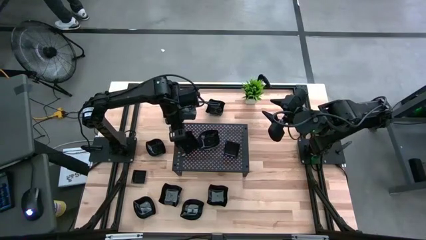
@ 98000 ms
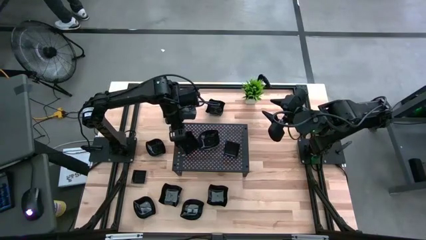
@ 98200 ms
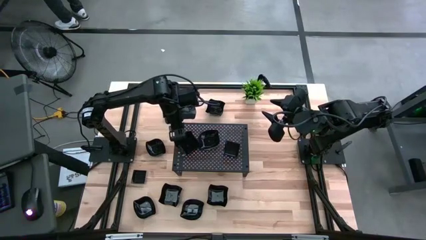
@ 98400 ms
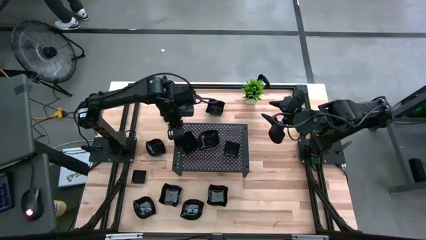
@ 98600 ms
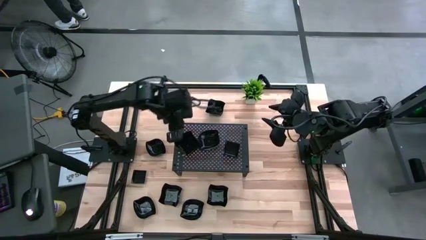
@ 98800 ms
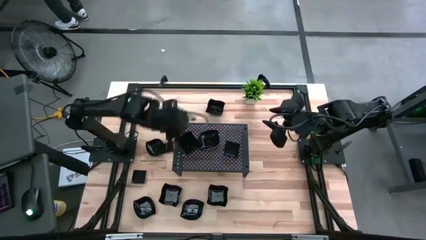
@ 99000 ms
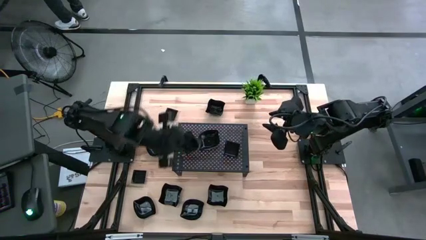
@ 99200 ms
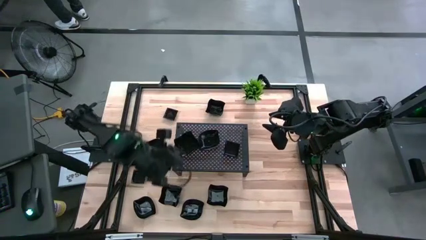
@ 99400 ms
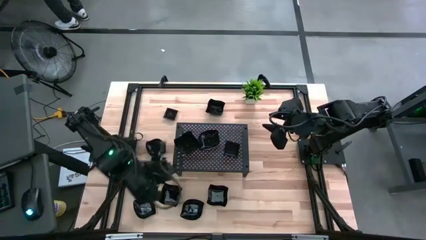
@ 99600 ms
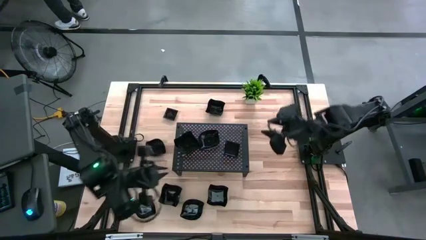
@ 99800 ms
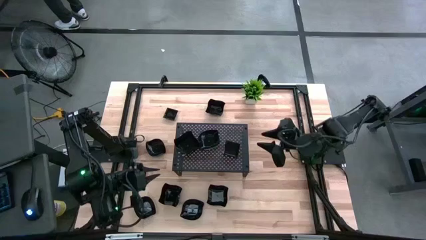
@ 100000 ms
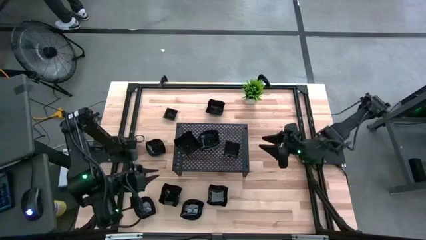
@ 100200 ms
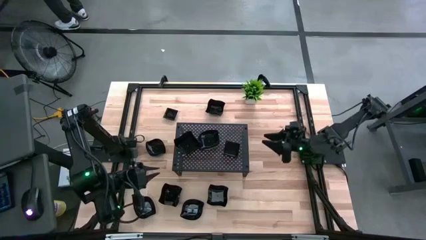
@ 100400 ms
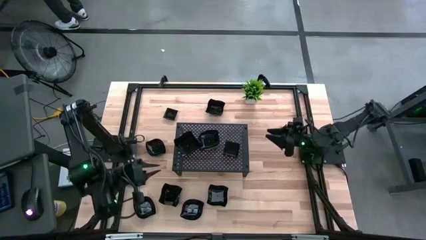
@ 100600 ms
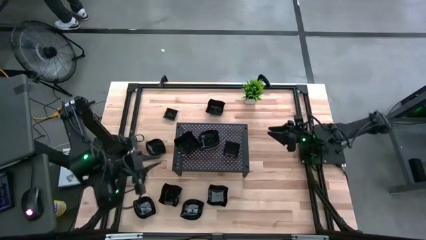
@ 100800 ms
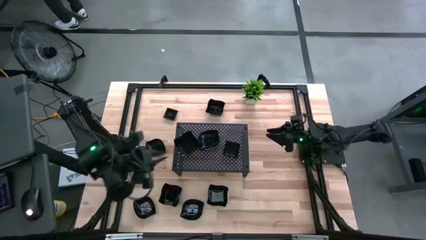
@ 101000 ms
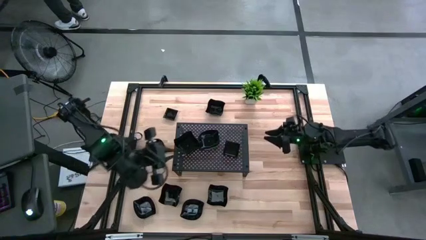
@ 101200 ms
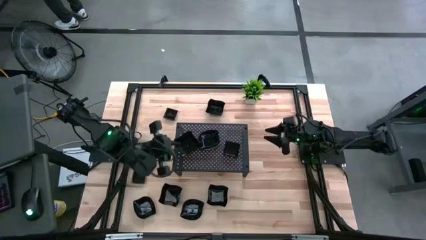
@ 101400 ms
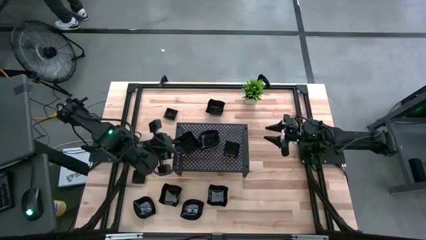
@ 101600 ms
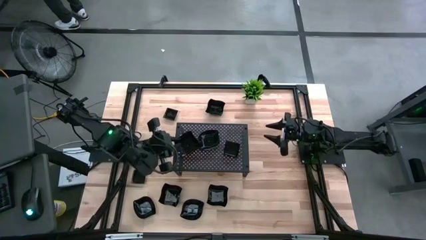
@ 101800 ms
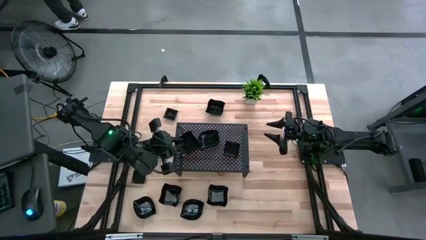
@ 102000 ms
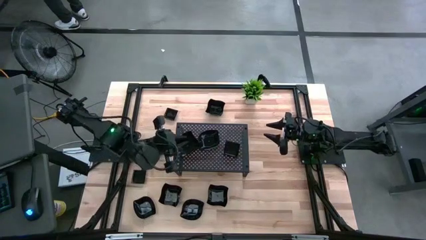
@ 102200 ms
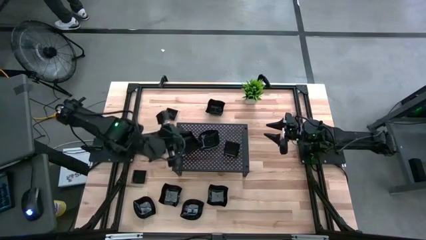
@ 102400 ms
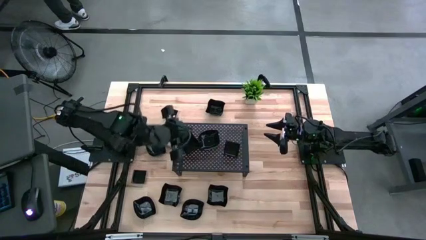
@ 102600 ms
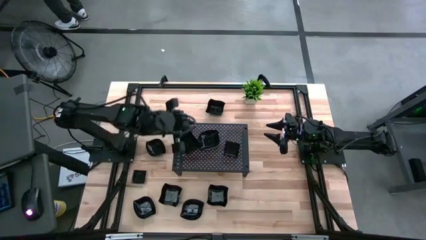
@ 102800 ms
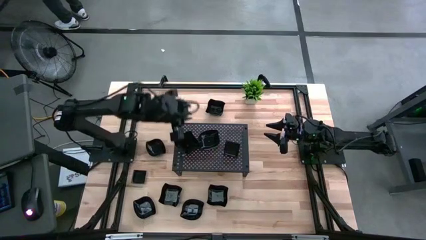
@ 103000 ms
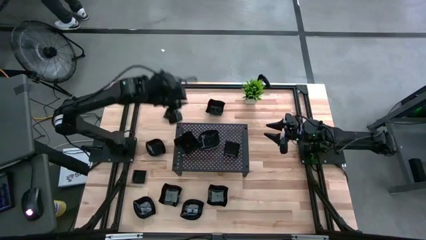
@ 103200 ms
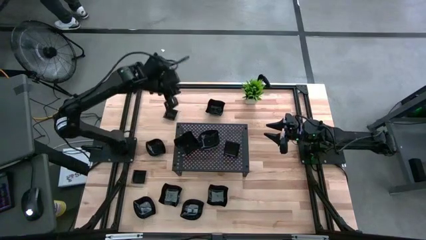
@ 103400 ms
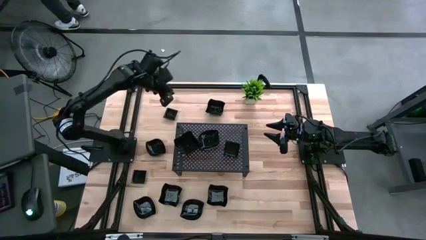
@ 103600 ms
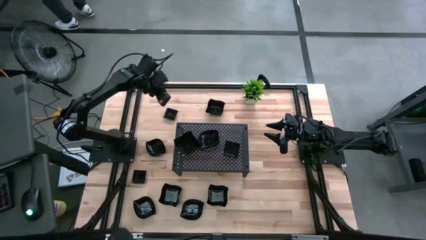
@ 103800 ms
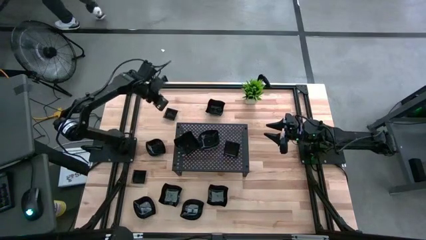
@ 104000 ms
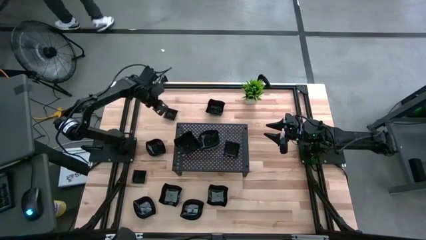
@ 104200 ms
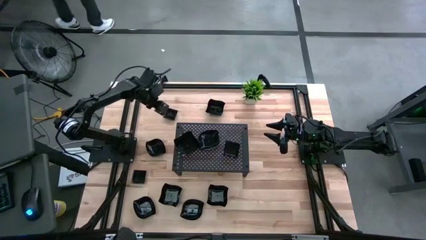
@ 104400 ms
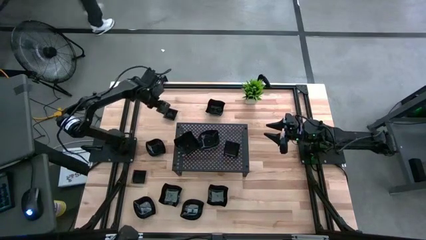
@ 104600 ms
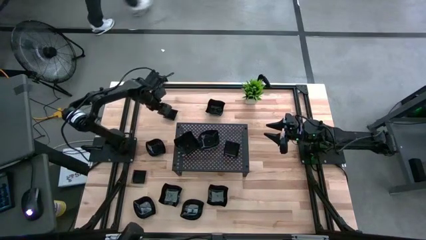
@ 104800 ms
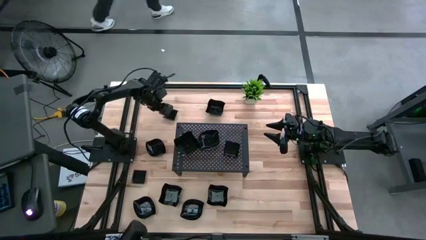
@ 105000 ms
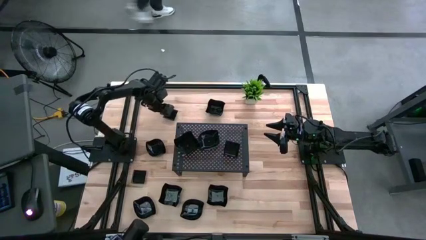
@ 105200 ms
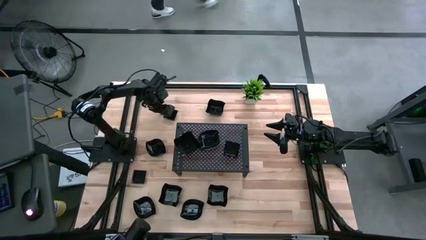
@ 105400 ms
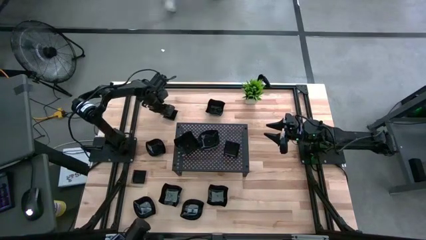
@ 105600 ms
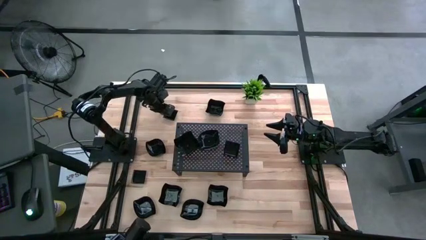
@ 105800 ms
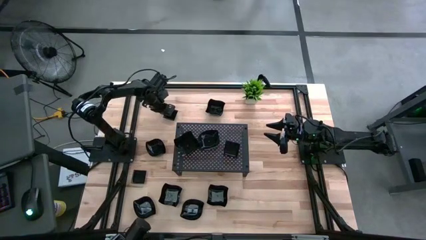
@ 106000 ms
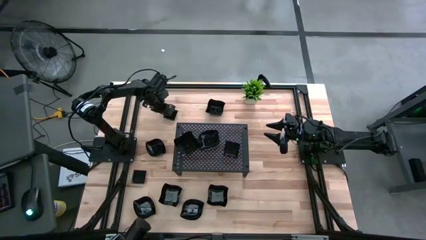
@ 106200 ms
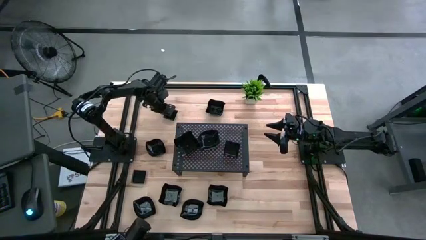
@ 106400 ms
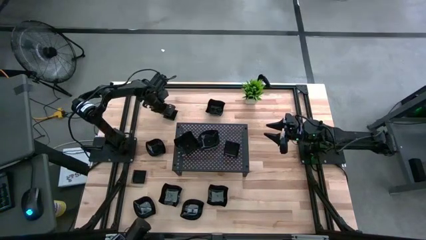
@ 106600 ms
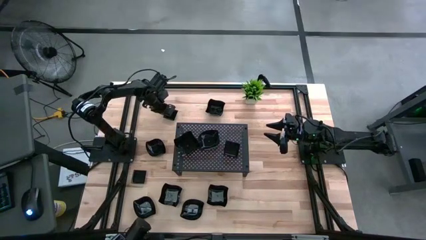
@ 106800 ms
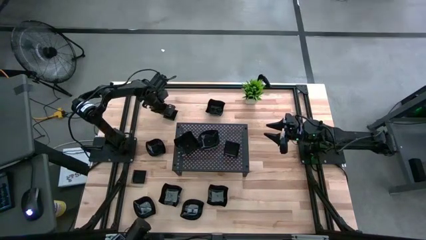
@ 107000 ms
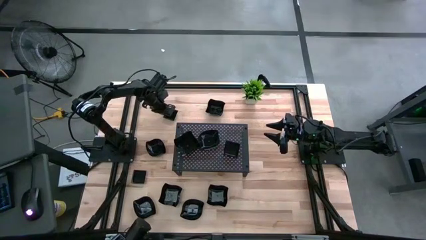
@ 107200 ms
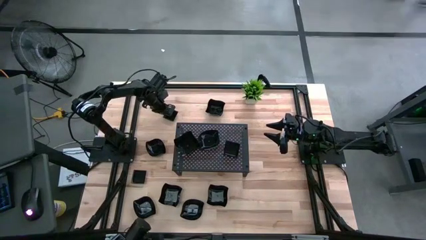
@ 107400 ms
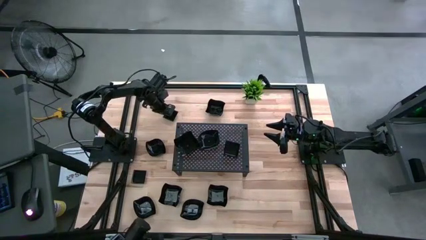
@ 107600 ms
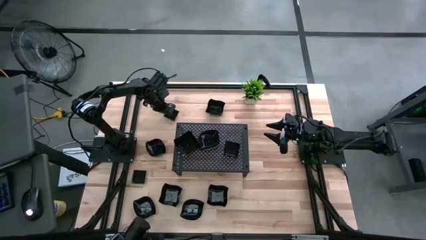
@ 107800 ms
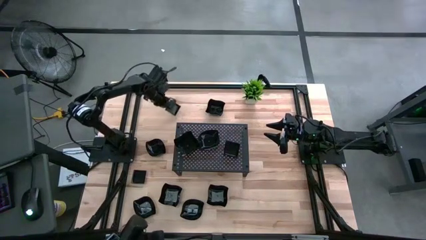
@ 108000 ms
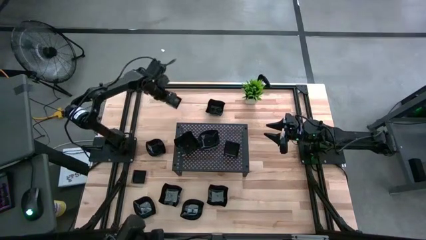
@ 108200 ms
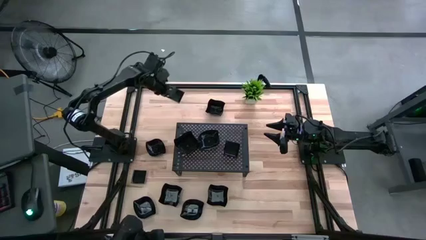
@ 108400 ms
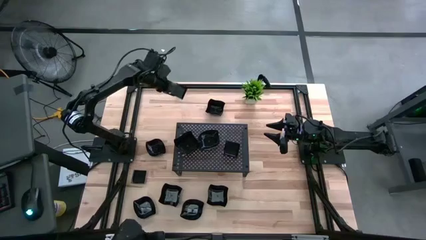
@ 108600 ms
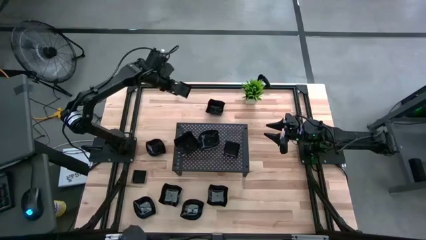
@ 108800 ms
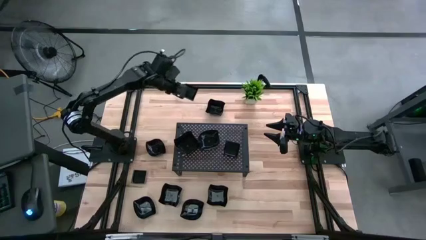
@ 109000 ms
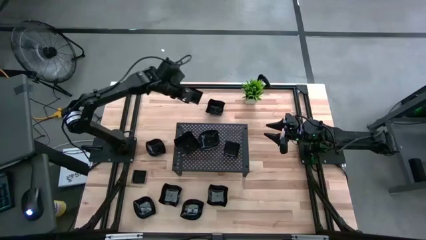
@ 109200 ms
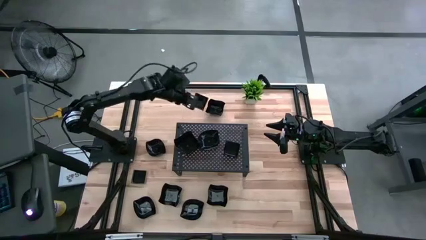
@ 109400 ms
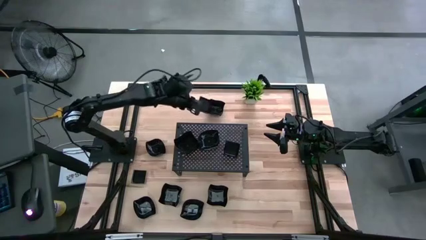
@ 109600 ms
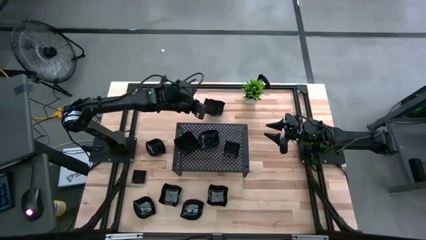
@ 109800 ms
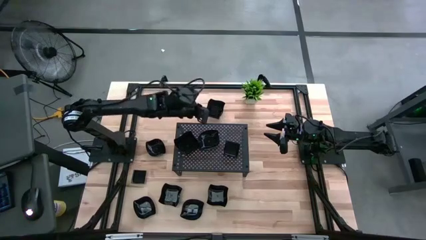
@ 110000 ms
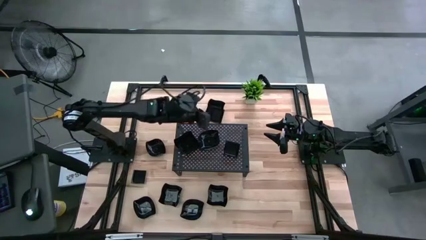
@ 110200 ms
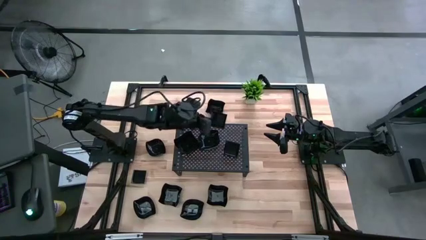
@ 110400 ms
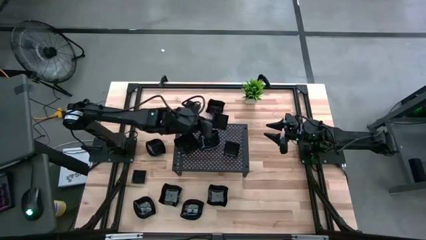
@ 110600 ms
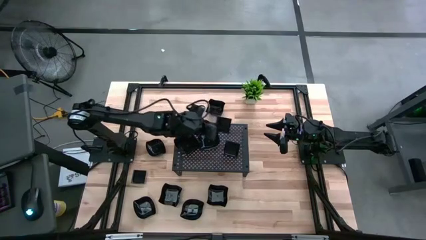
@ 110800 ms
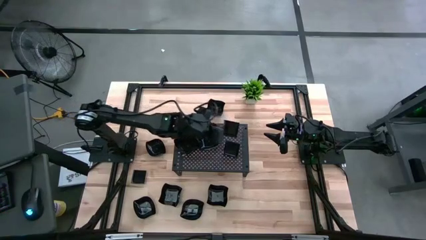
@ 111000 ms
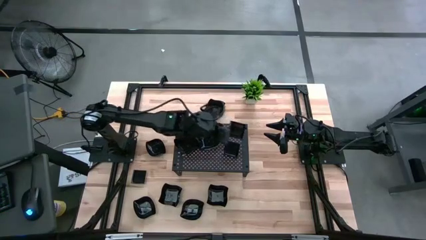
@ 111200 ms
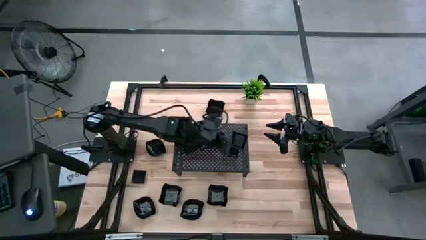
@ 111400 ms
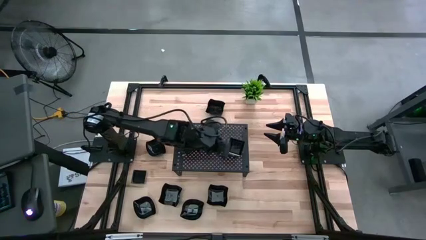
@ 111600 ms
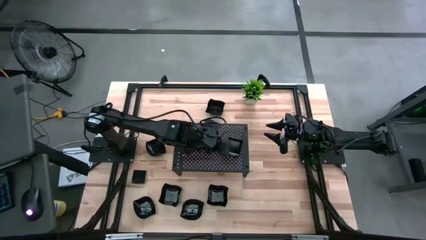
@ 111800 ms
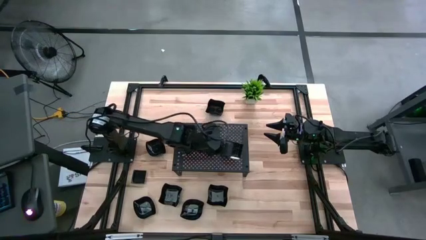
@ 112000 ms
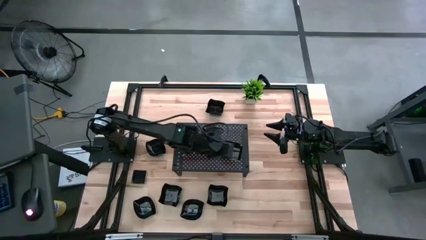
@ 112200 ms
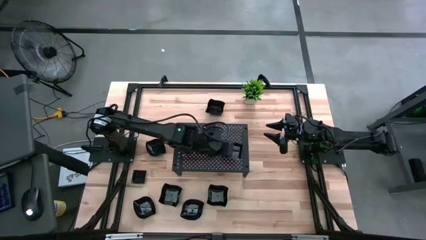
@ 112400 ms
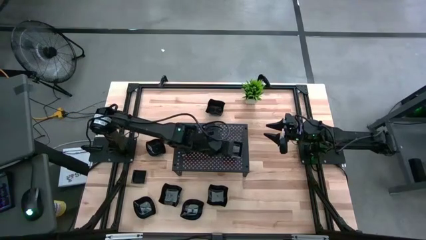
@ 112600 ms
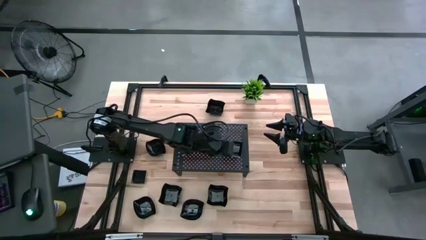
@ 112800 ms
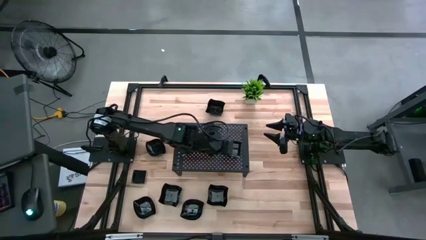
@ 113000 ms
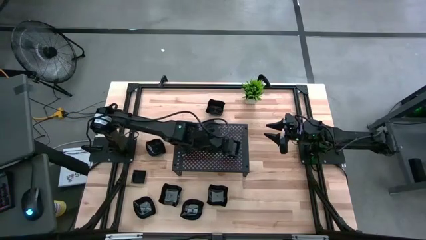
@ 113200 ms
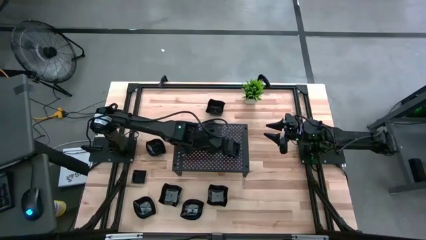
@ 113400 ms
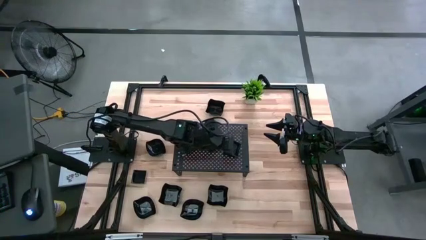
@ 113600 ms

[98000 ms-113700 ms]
Task: Pick & Place Mini shaped plates
Stack the top square plate on top of the square plates on the shelf
